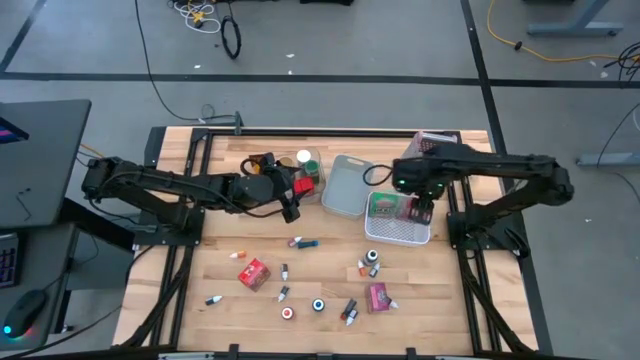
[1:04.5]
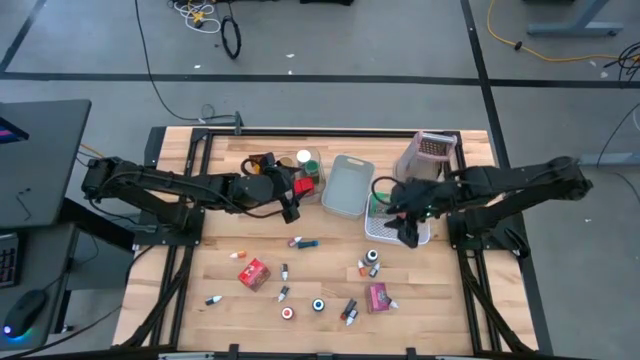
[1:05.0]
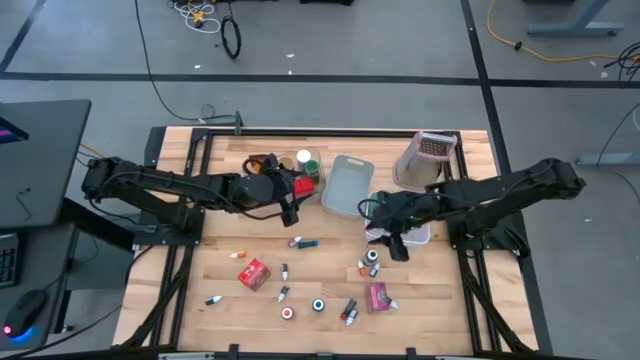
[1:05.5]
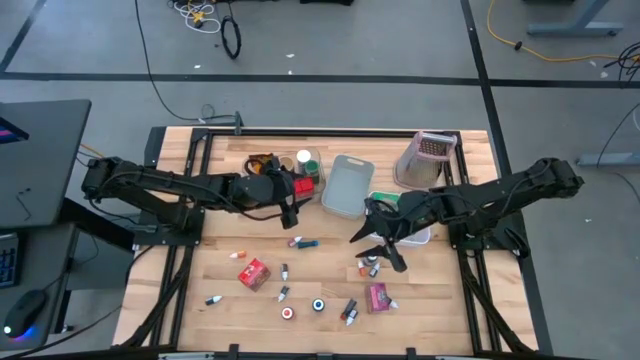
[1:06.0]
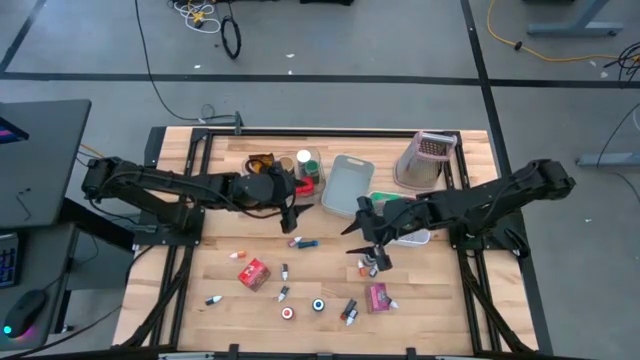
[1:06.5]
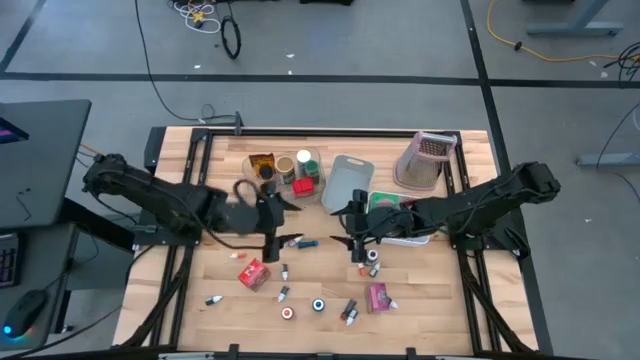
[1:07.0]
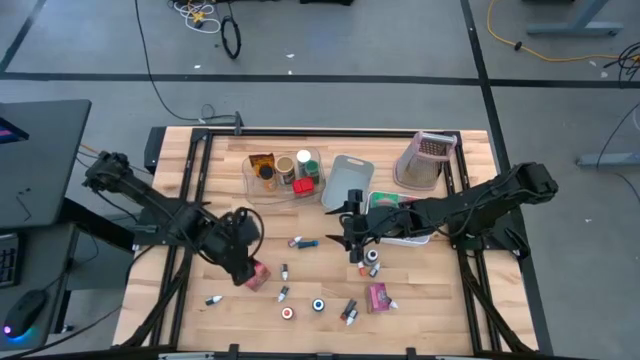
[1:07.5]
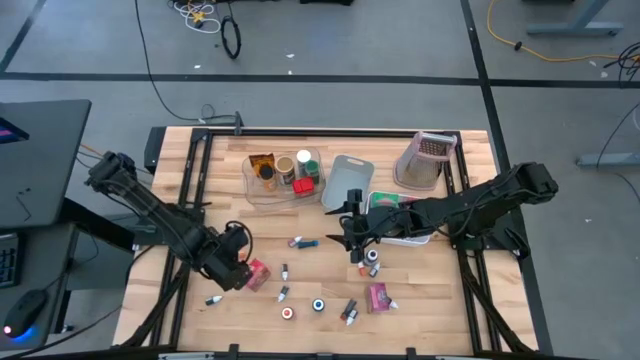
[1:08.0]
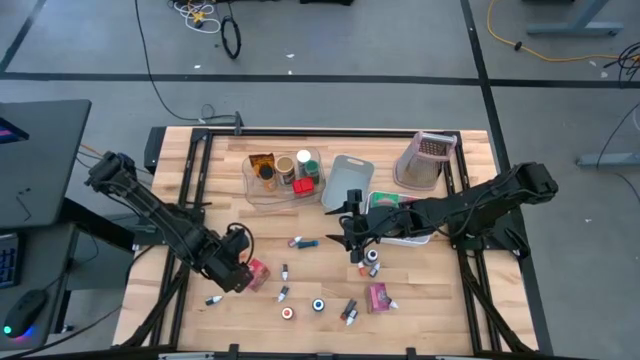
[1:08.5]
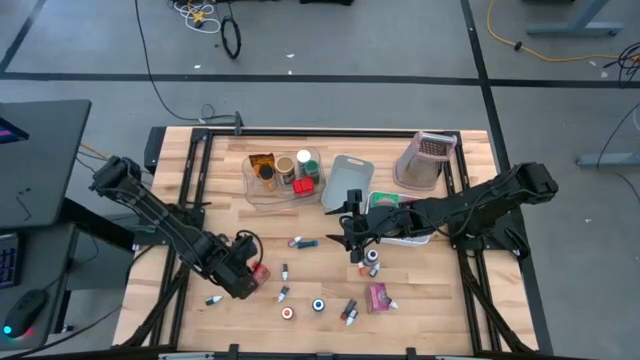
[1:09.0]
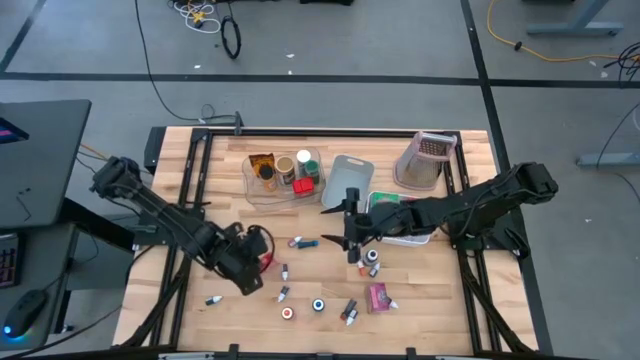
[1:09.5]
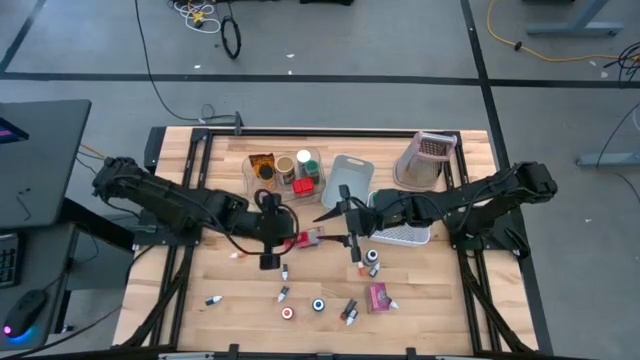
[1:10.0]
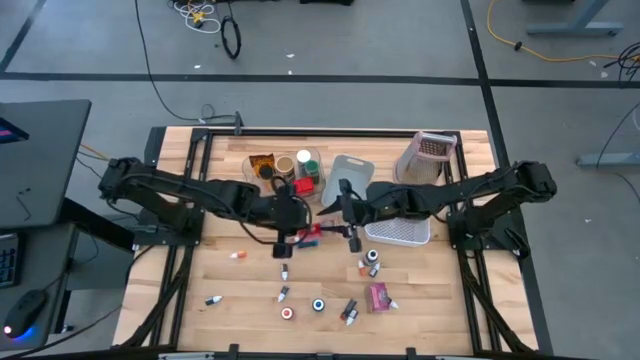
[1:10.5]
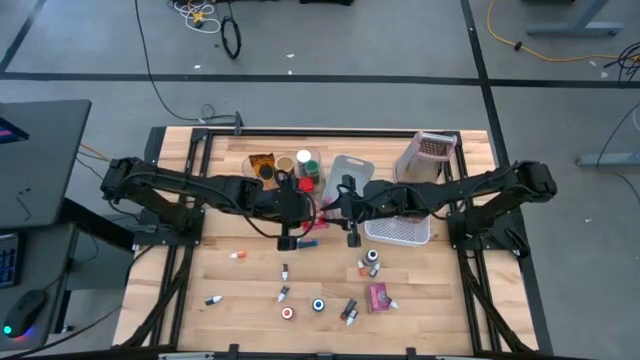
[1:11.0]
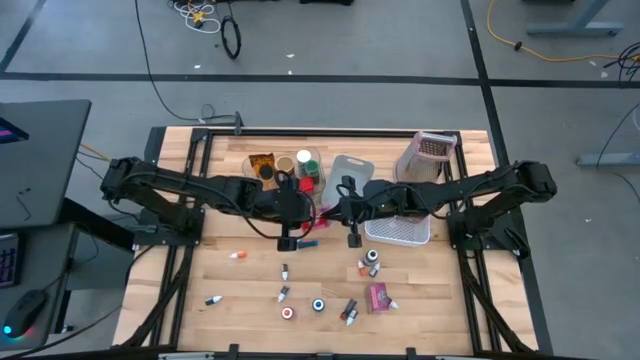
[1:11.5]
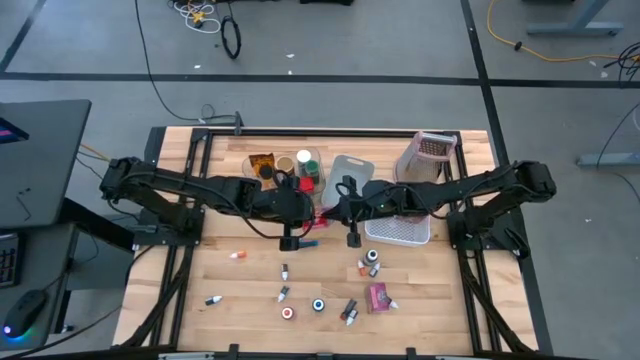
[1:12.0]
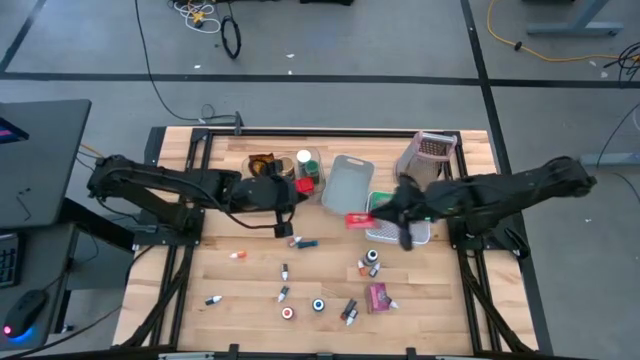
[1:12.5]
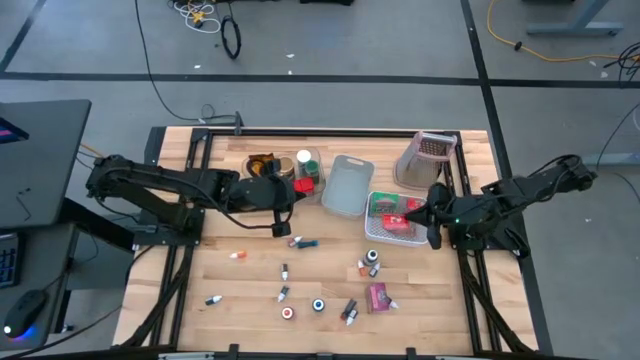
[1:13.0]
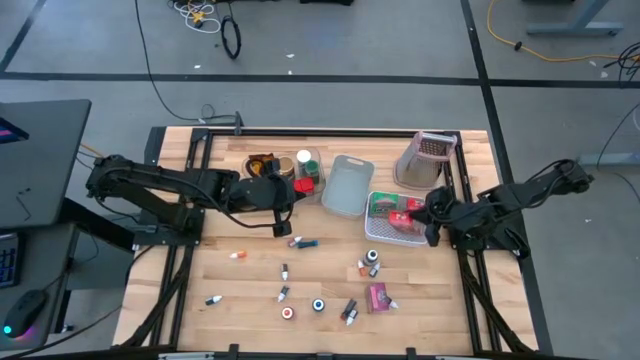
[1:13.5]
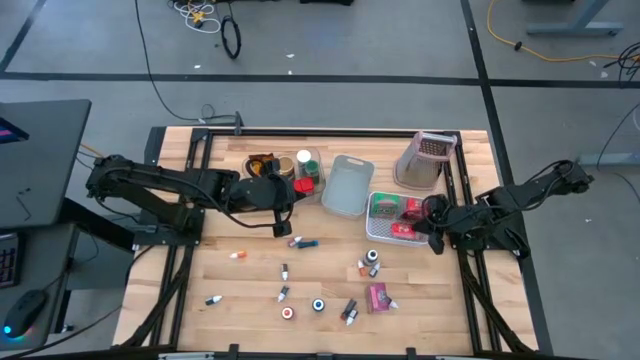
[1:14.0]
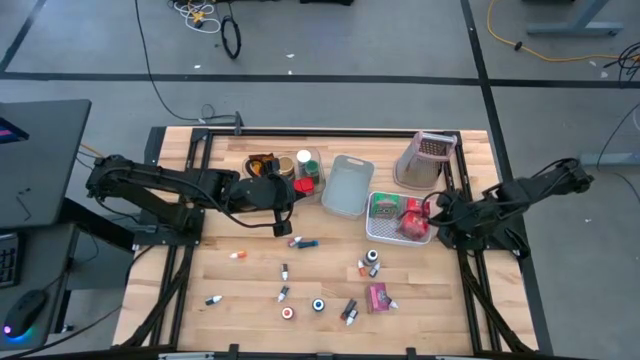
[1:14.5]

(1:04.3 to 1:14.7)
Task: Pick & Place Kitchen Items
Put the red cereal box into the white bin

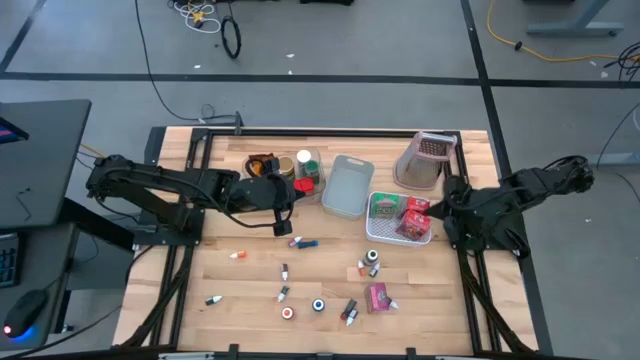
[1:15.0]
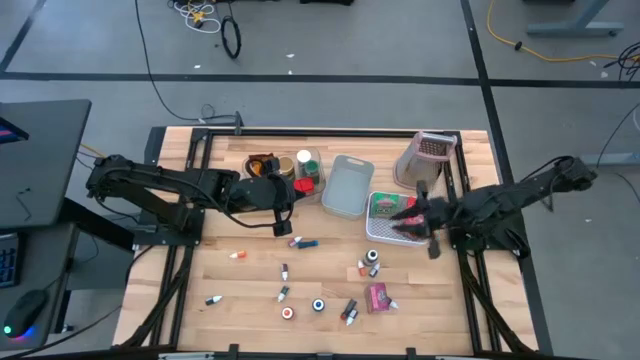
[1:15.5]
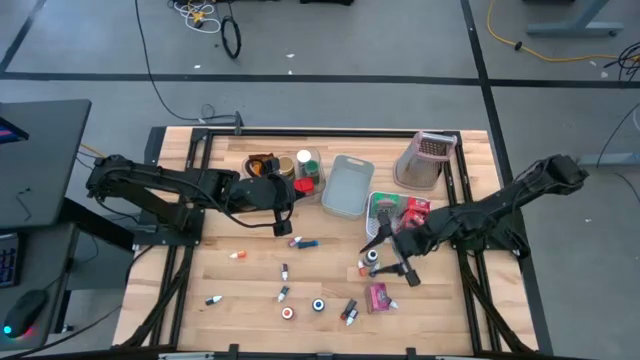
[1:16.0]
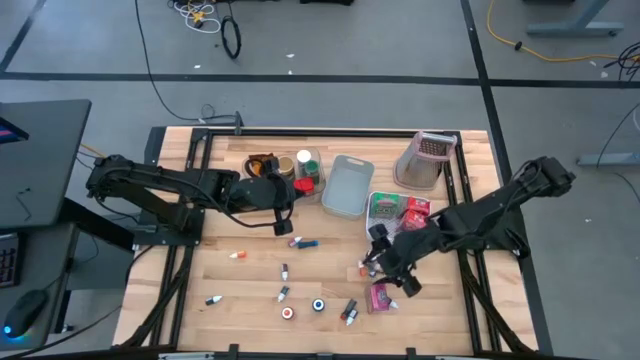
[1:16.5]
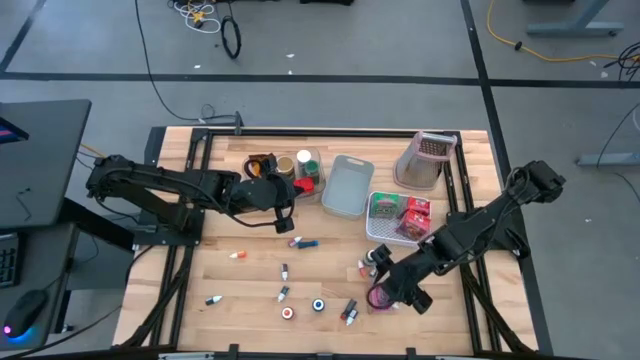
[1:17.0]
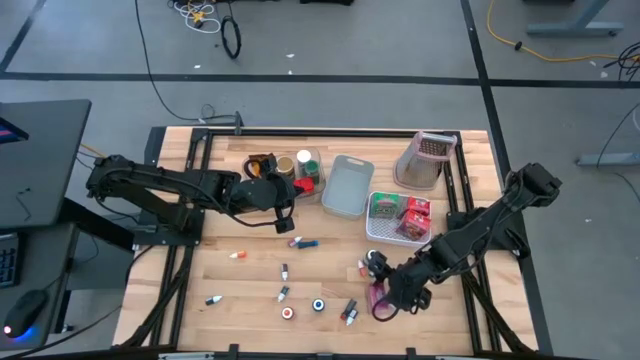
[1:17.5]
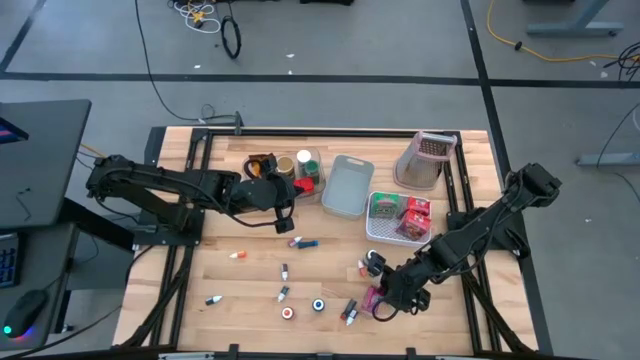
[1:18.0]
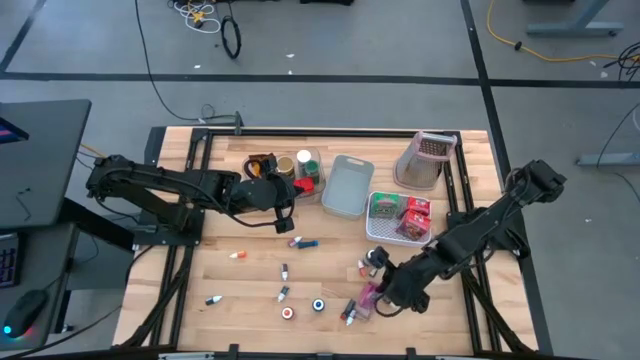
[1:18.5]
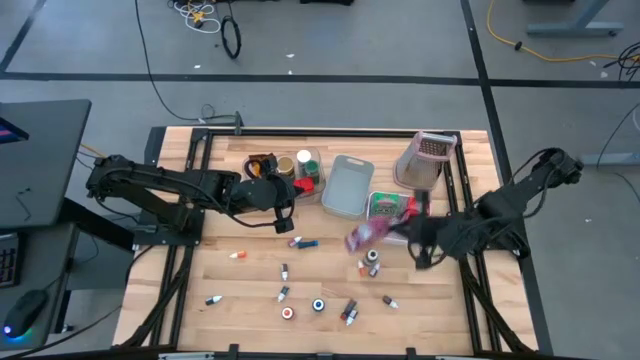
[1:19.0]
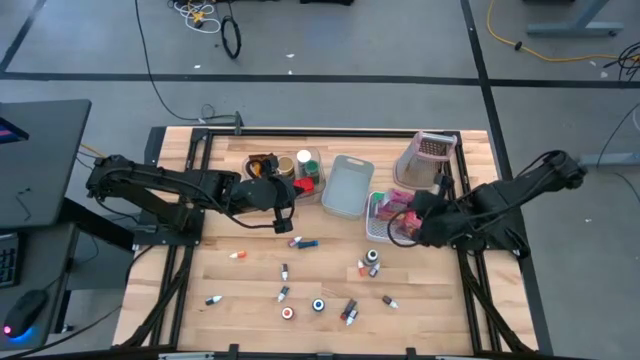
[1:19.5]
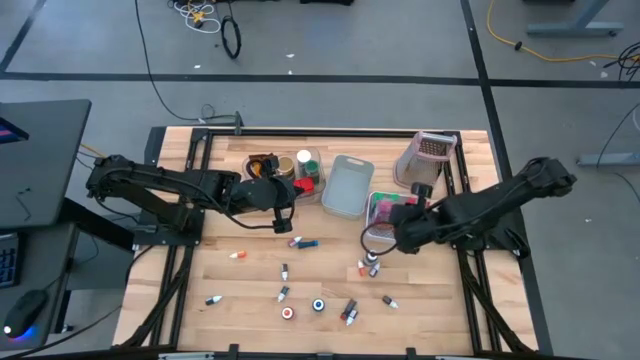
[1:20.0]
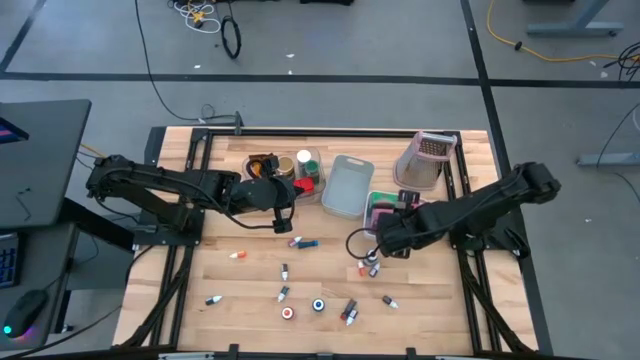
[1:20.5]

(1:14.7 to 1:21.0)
Put the purple cereal box into the white bin

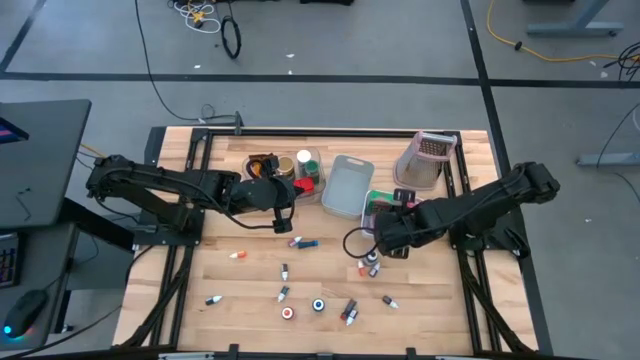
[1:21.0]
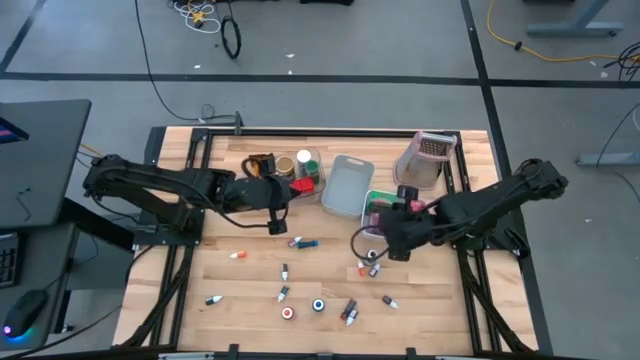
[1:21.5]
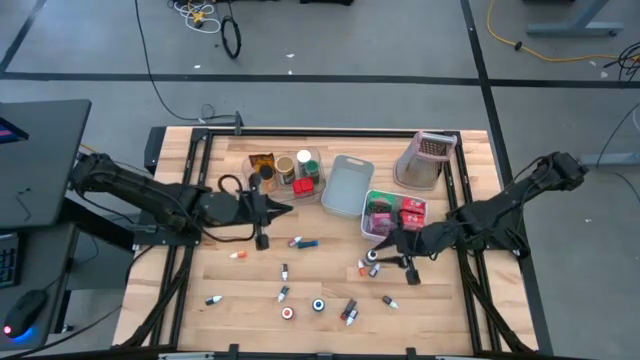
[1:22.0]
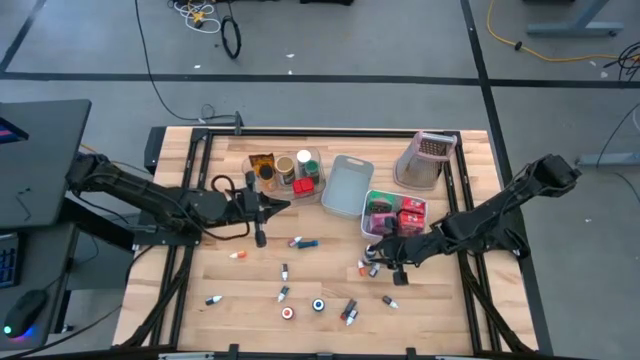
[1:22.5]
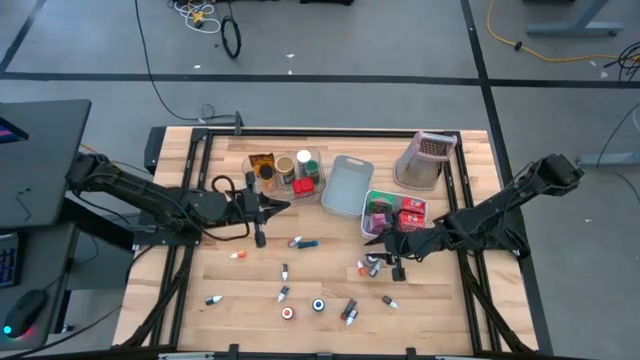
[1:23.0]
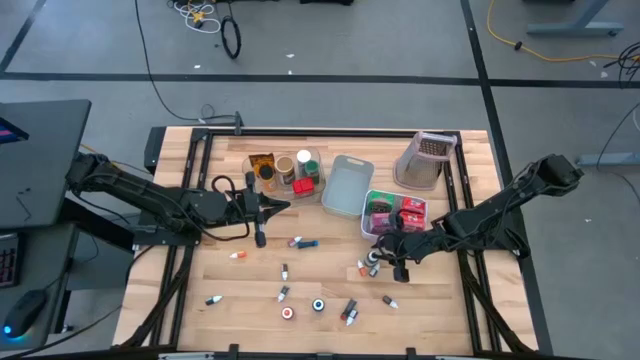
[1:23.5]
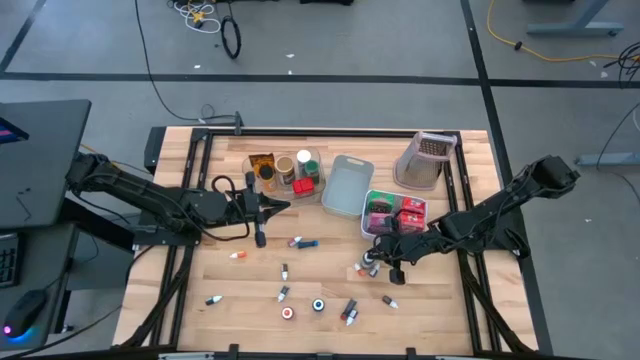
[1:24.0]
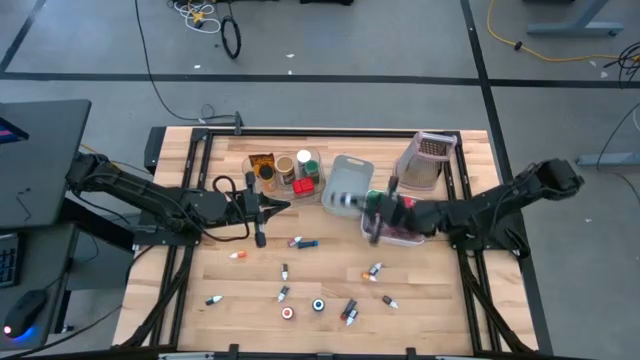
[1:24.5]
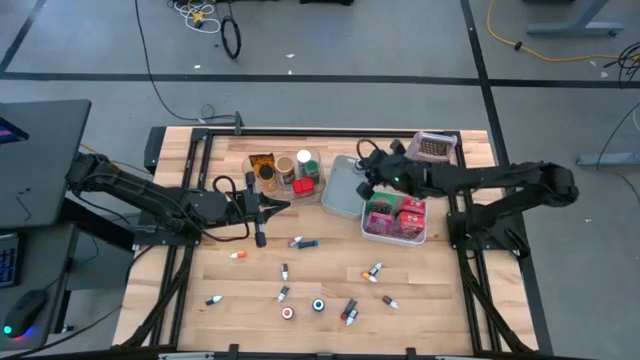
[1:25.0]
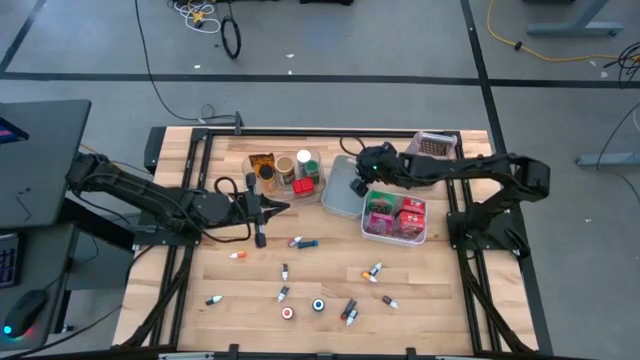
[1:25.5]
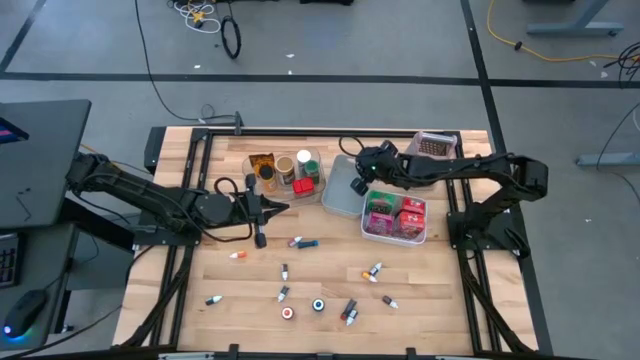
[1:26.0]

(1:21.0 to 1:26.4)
Put the big black food bottle coloring into the gray bin
